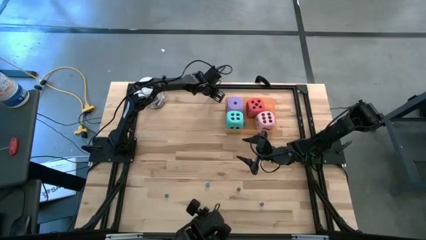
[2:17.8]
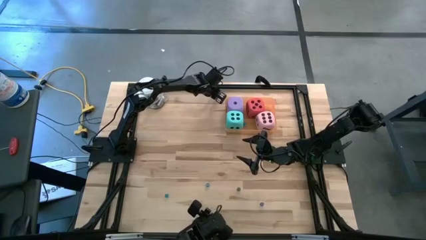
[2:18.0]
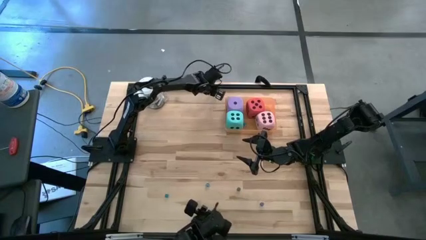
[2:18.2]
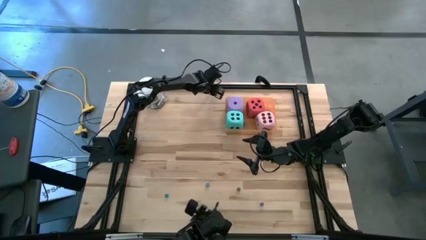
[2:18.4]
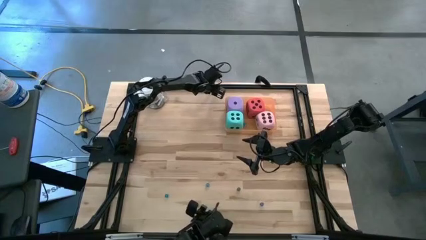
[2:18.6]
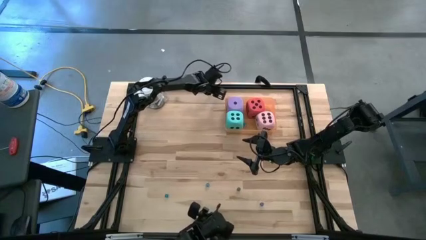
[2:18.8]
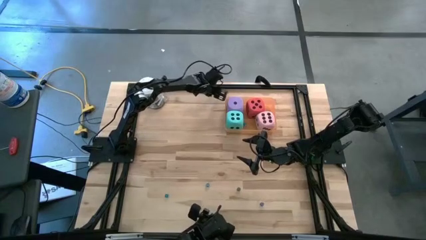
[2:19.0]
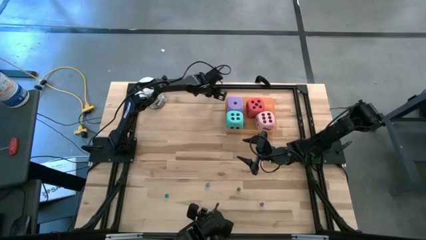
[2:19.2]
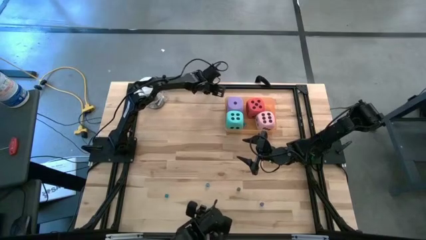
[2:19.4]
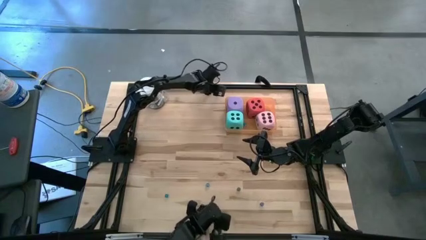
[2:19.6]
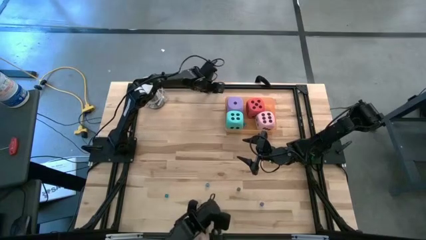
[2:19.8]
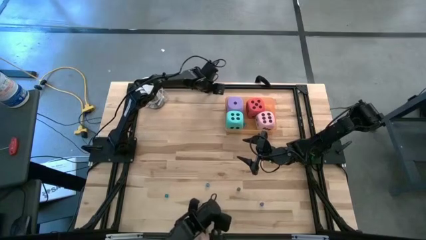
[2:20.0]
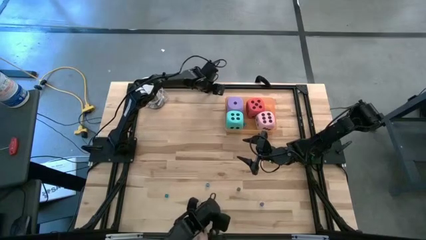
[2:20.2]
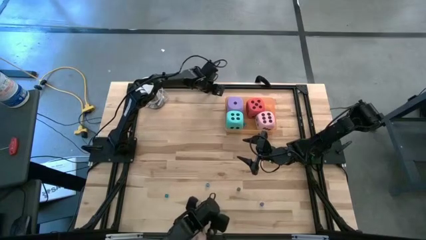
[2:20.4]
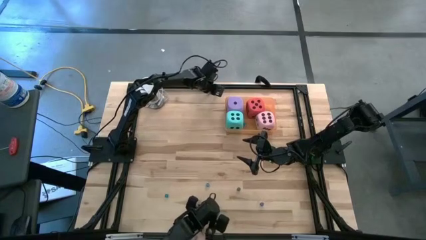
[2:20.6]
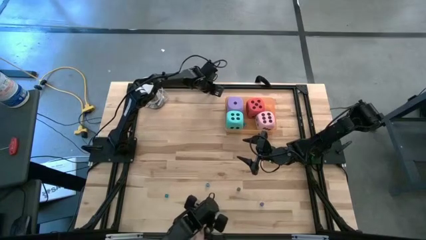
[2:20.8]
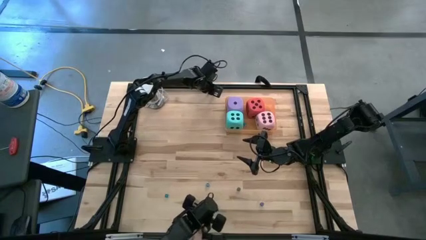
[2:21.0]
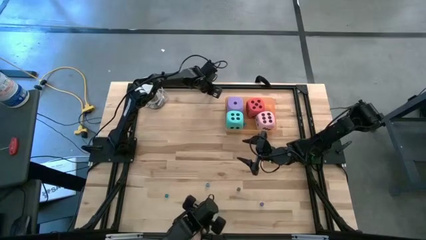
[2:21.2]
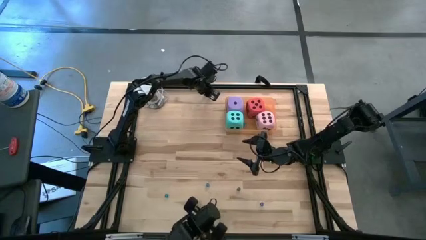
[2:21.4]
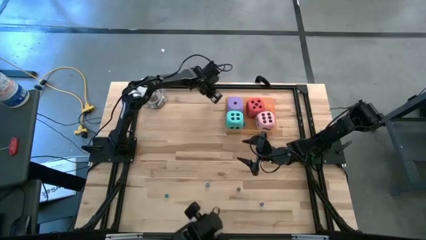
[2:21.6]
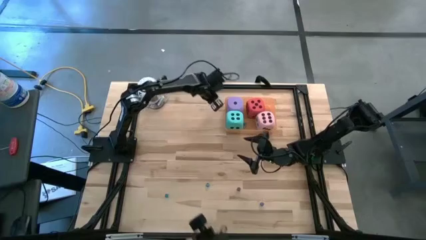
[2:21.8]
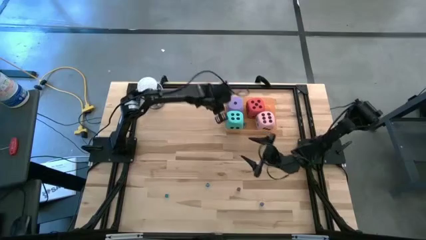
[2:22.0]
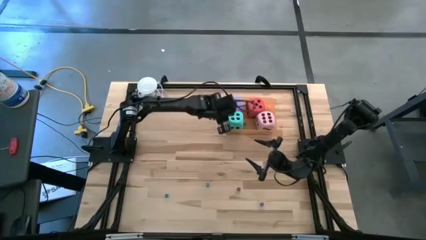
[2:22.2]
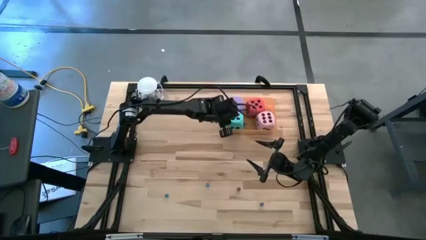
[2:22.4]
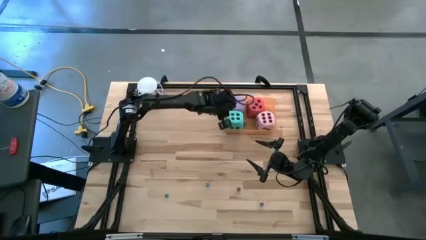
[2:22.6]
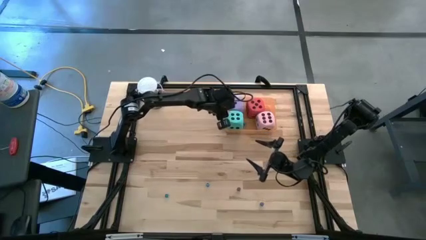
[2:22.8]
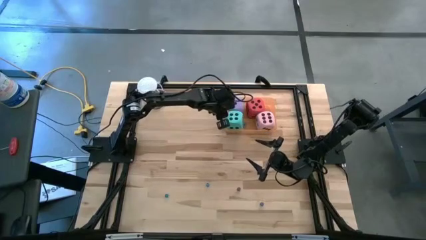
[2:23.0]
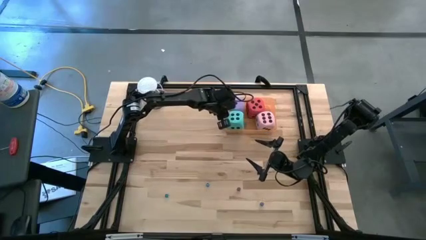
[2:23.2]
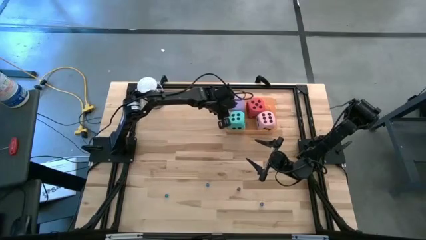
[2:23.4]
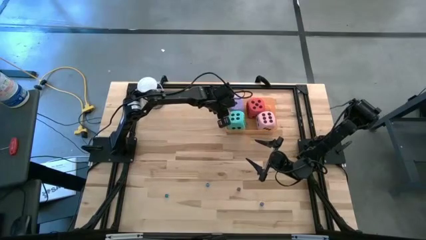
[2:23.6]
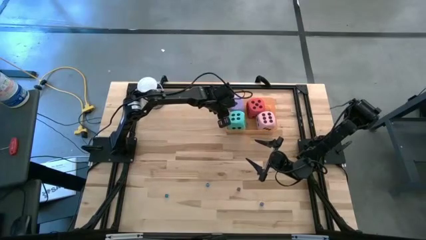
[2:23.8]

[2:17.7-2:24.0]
Task: Pick & Place Dice
Put the small orange die into the the orange bin

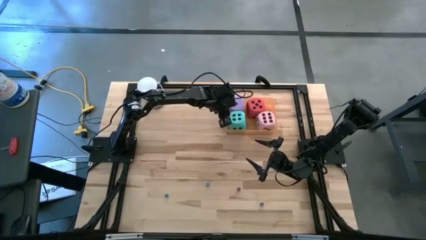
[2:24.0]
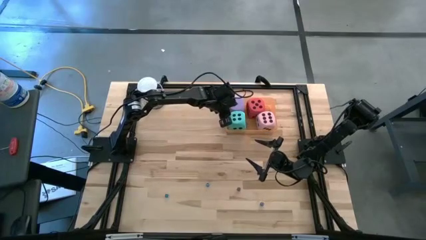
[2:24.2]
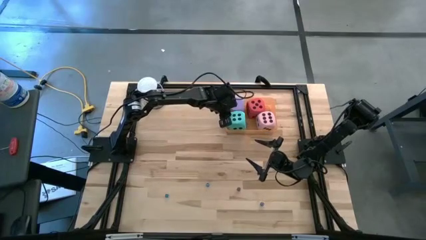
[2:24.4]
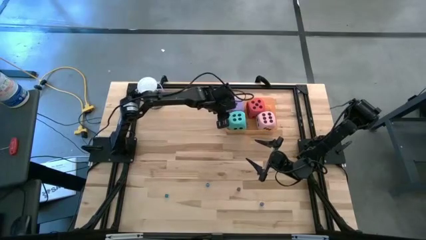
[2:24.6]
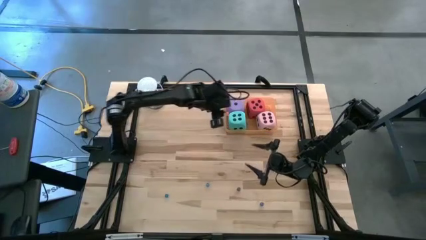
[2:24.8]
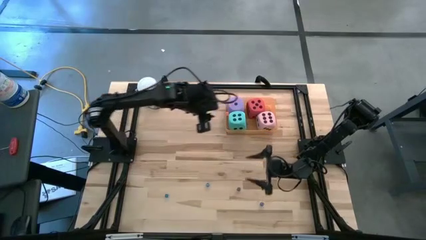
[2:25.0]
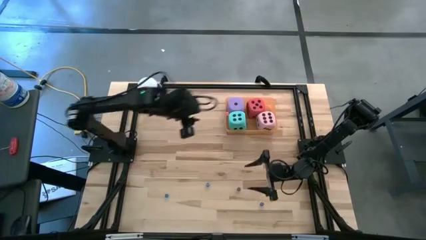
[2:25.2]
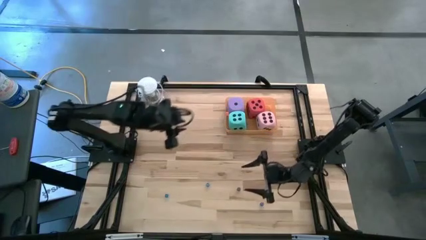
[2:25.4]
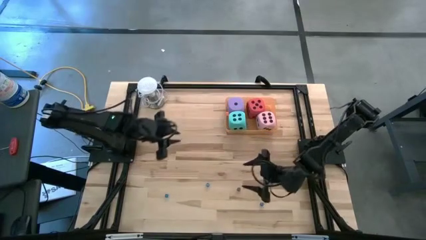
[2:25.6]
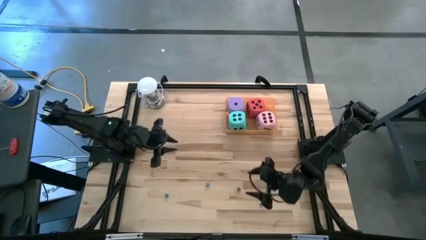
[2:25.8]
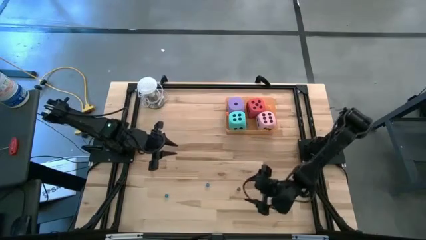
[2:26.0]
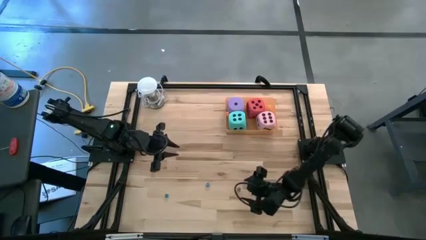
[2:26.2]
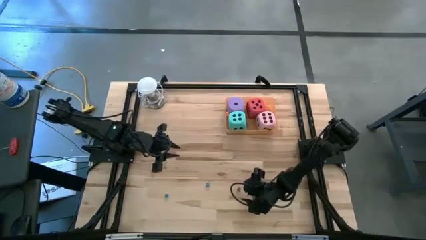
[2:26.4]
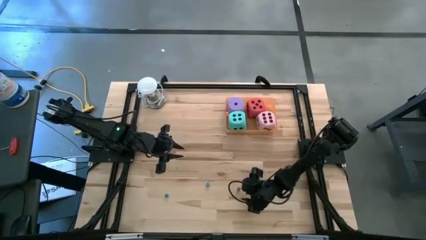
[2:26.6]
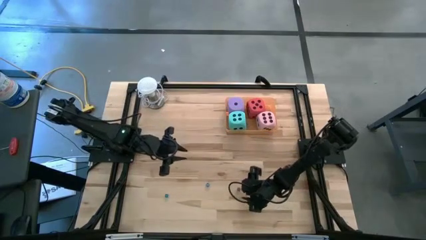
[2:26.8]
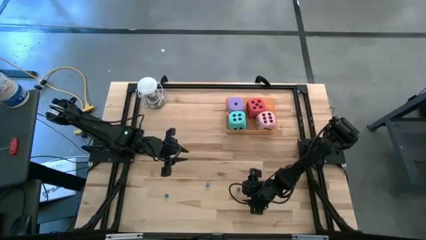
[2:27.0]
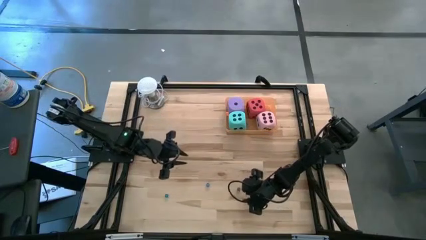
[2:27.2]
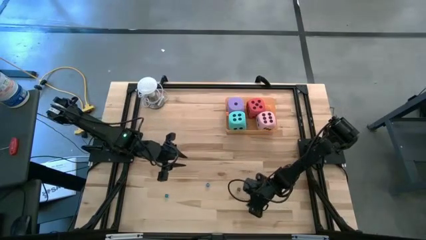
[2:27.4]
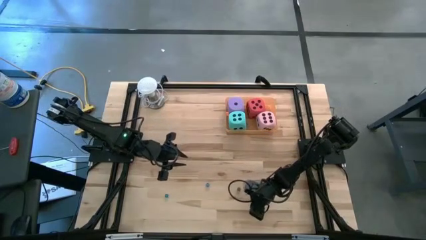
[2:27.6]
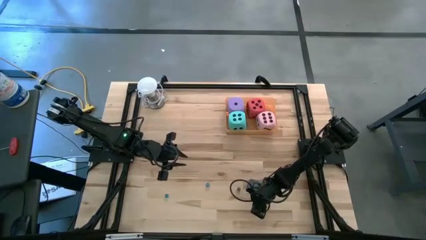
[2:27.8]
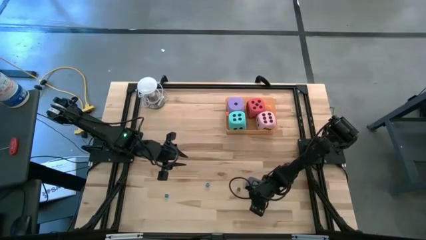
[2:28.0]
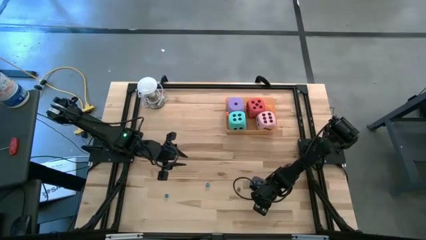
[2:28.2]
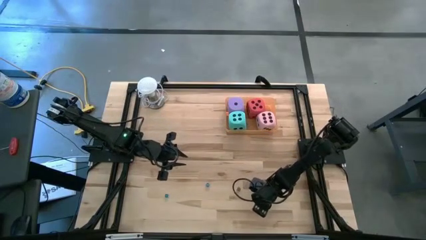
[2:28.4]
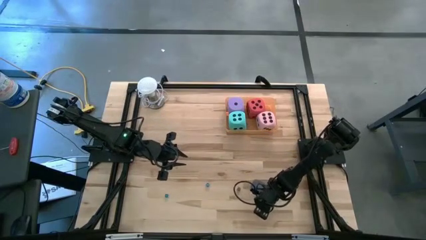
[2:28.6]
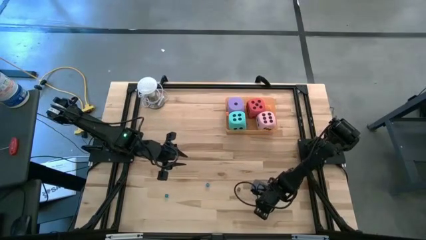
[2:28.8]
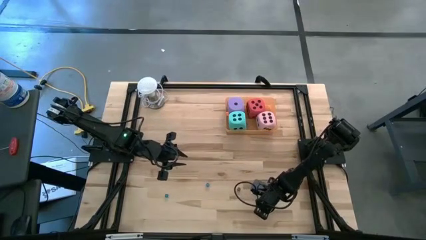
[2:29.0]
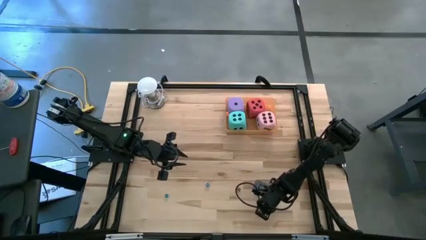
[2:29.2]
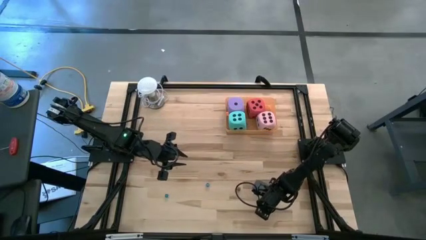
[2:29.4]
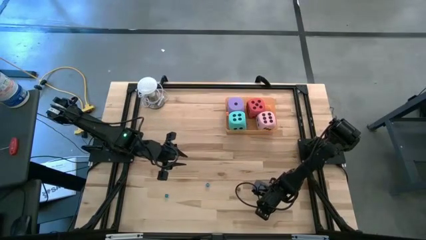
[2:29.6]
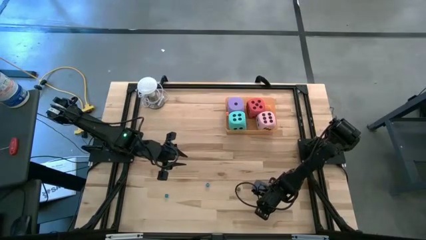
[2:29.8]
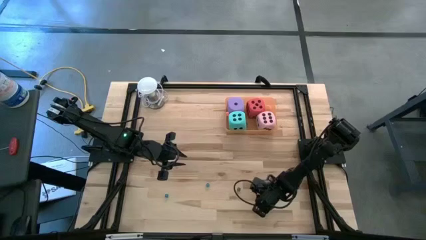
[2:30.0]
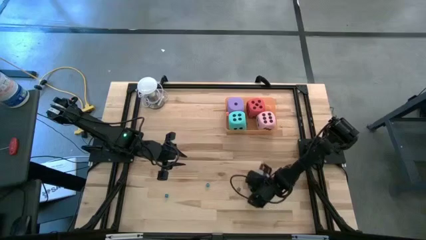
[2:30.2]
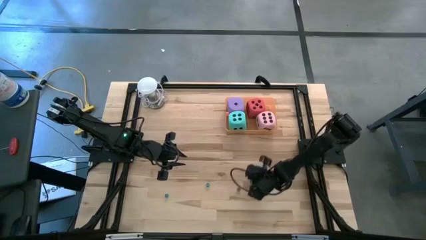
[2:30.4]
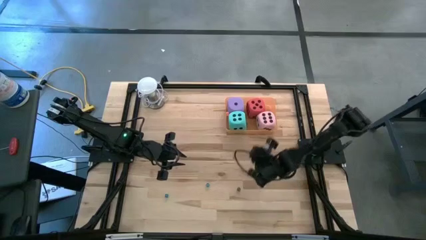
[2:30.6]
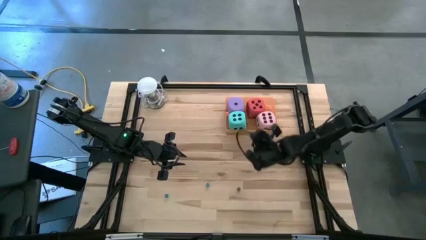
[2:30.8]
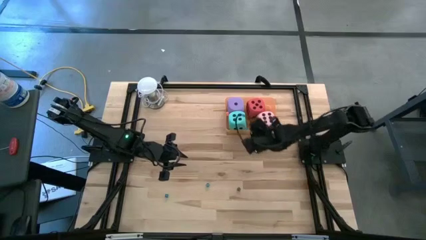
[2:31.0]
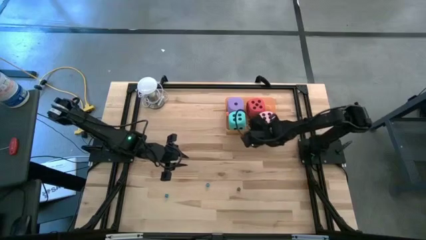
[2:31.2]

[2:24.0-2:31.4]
Put the small blue die into the the orange bin

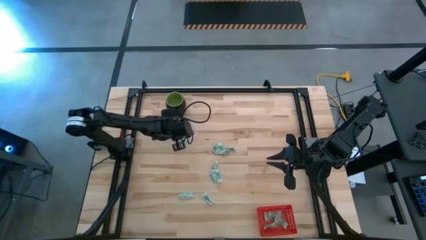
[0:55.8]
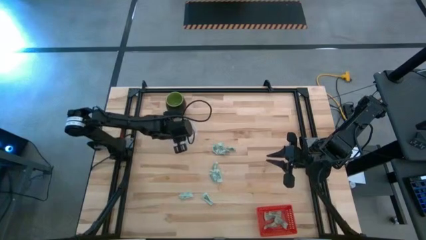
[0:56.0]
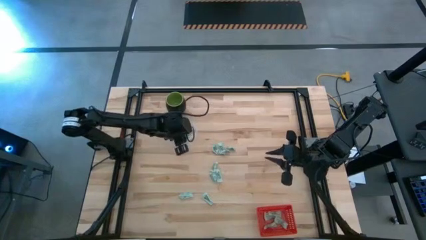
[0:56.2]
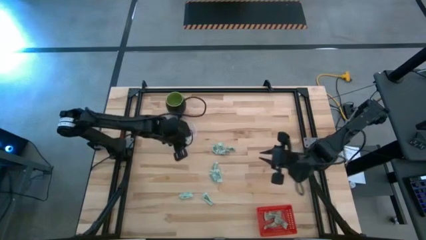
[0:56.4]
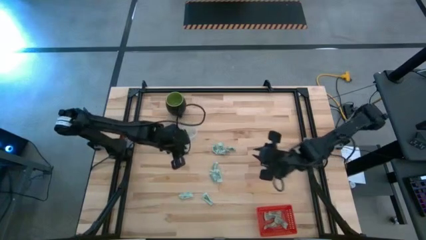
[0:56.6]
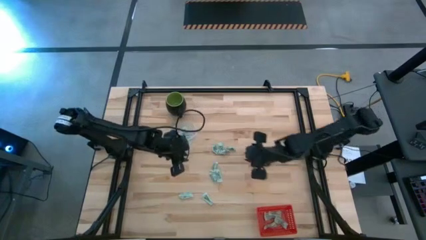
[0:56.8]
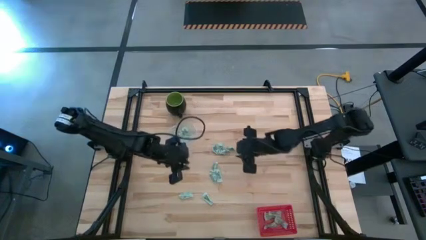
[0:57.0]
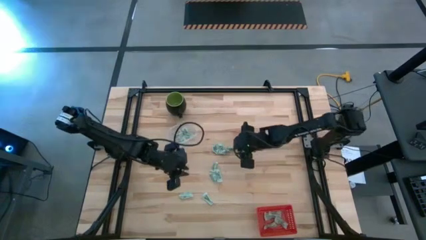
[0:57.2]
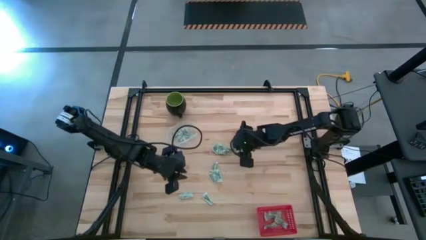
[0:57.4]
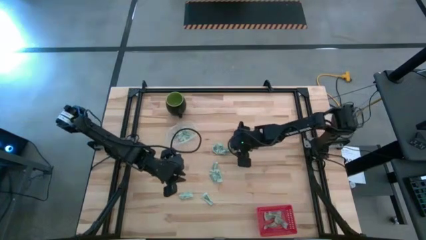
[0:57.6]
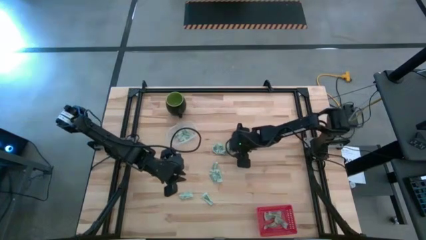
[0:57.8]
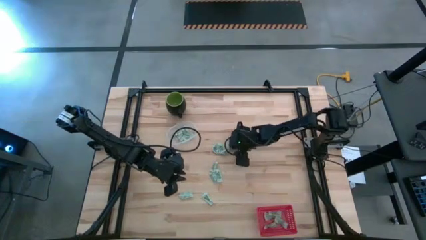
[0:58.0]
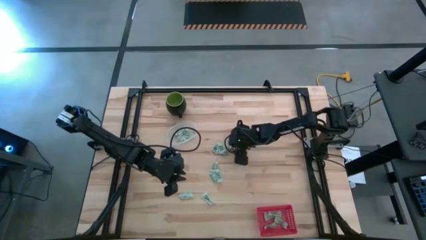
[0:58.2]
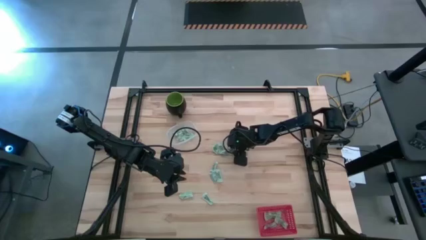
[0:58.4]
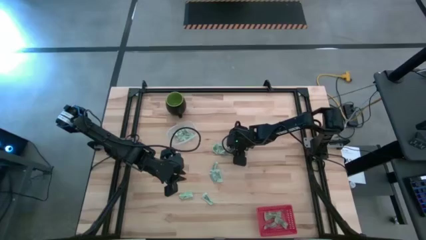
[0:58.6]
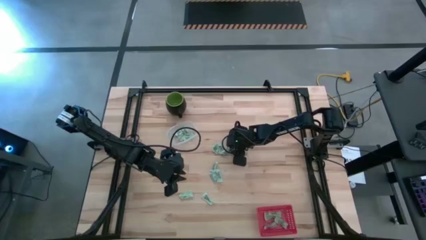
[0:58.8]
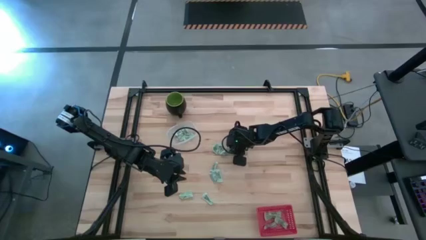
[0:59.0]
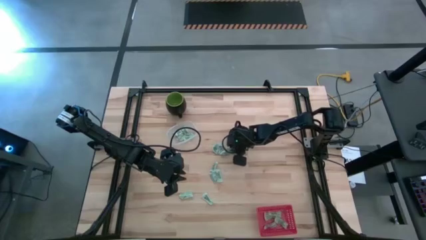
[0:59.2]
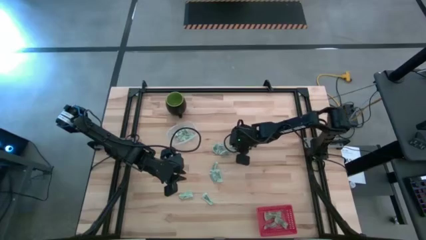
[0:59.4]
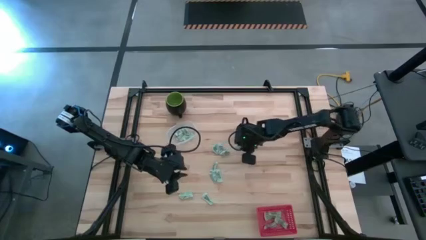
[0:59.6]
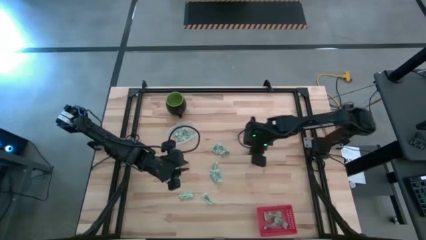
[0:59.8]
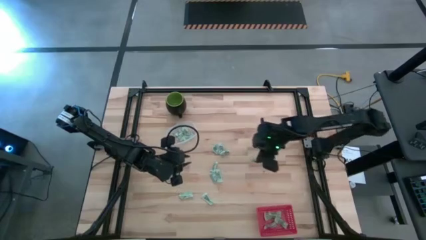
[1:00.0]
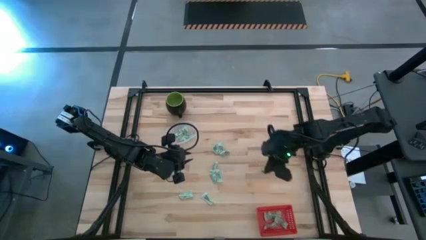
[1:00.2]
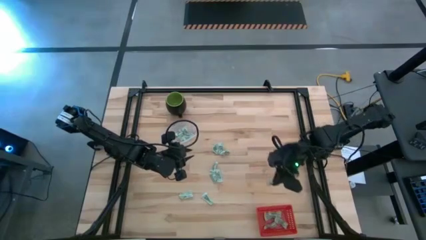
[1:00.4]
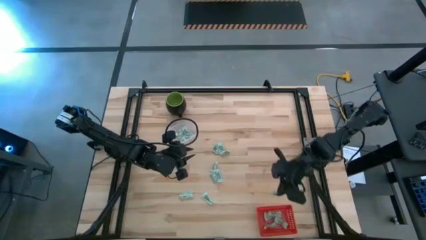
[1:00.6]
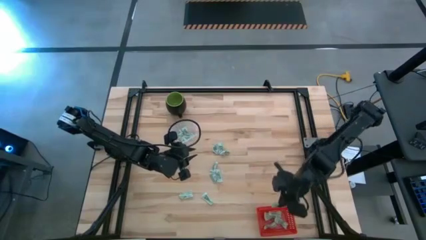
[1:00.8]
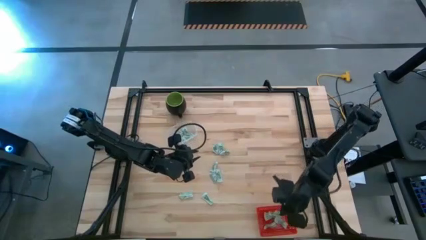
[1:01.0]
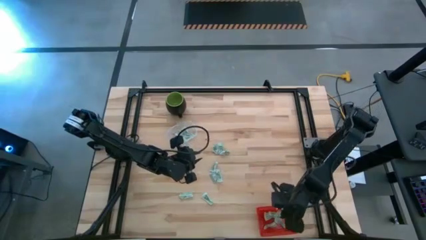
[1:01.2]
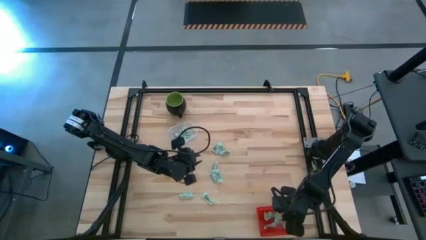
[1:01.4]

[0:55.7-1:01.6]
Task: Pick and place items into bin
Put the green stevia packet into the red basket
